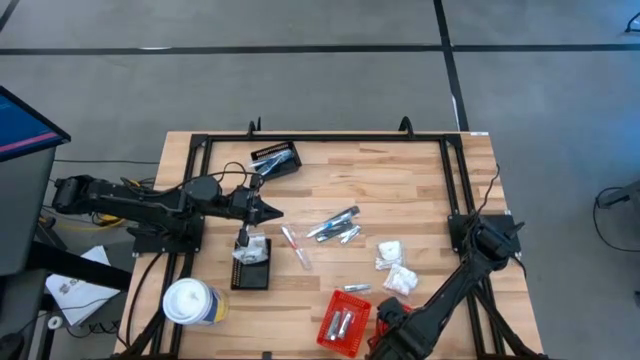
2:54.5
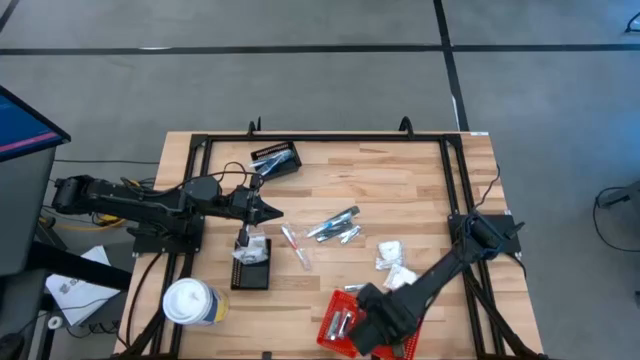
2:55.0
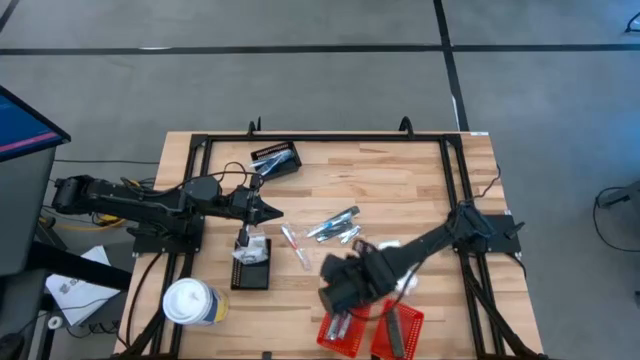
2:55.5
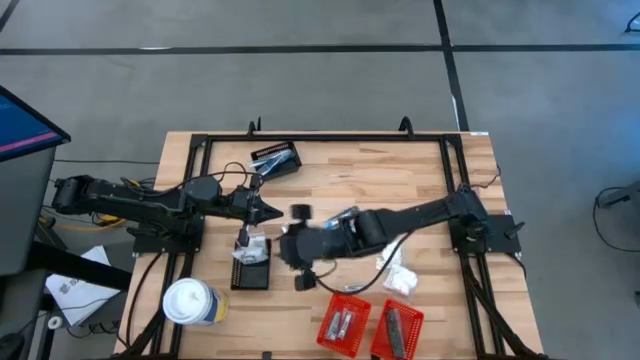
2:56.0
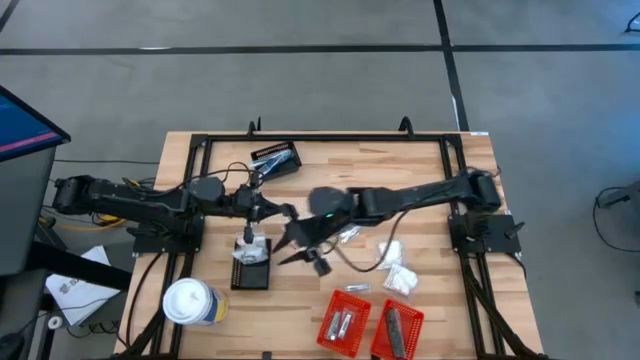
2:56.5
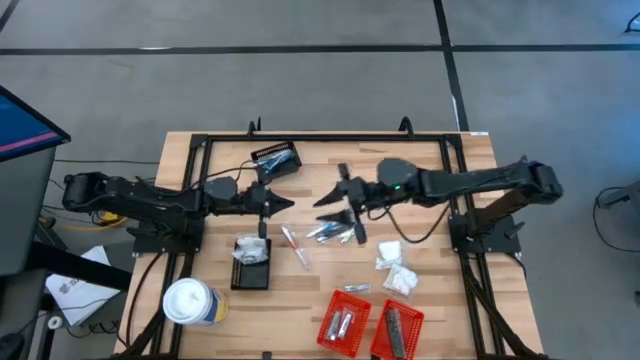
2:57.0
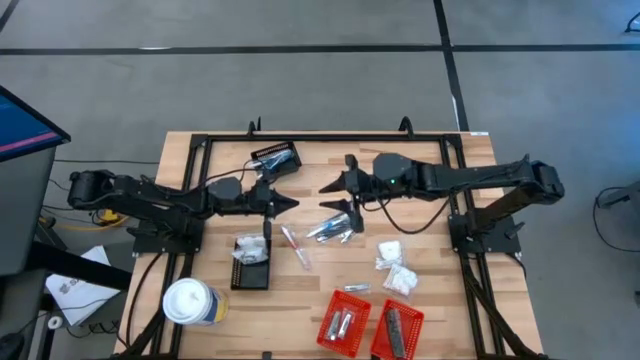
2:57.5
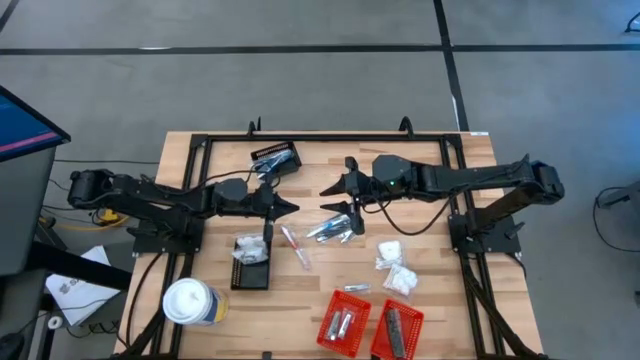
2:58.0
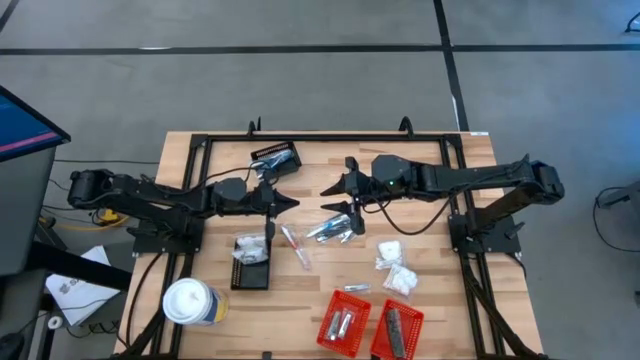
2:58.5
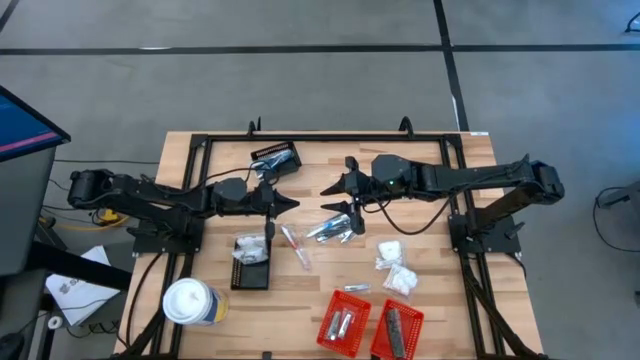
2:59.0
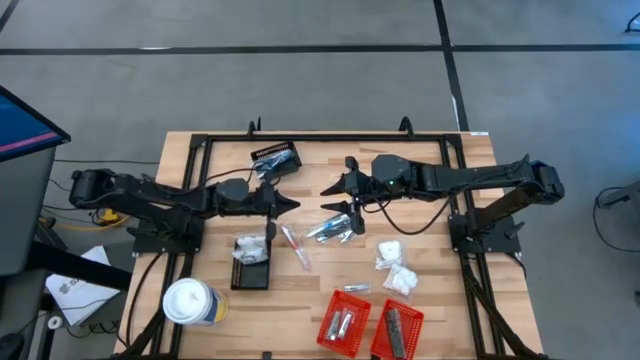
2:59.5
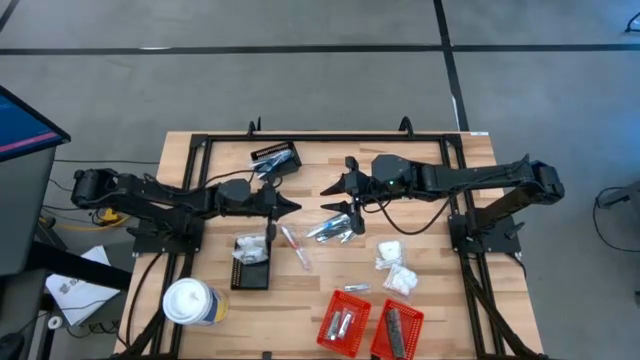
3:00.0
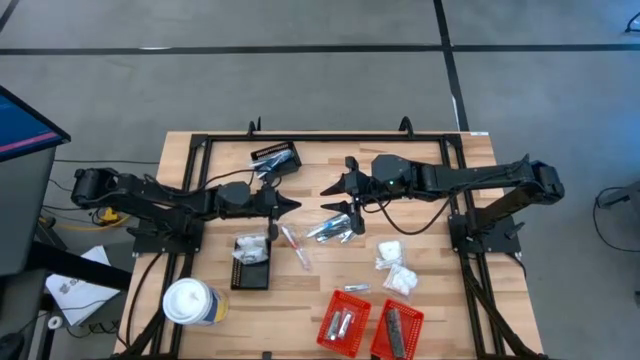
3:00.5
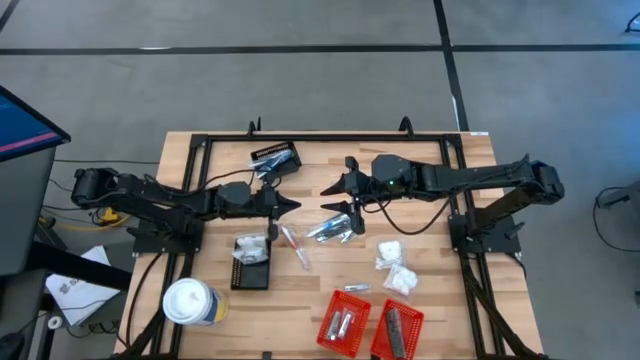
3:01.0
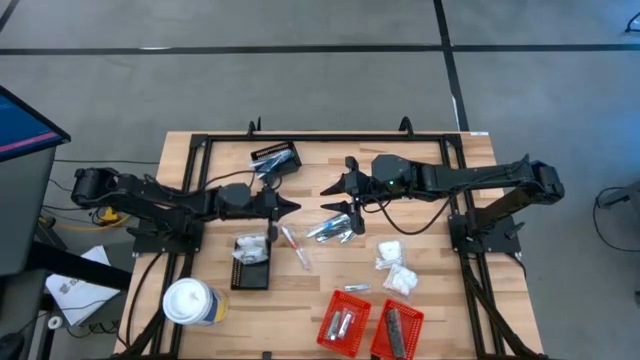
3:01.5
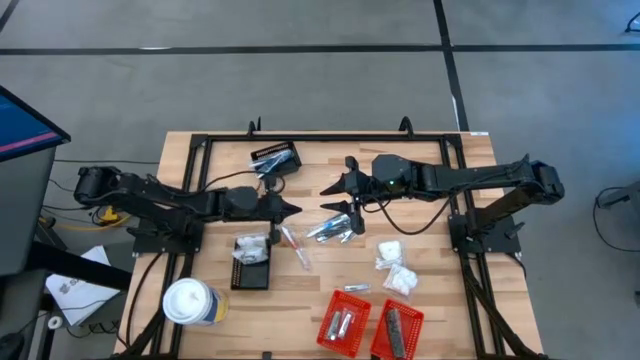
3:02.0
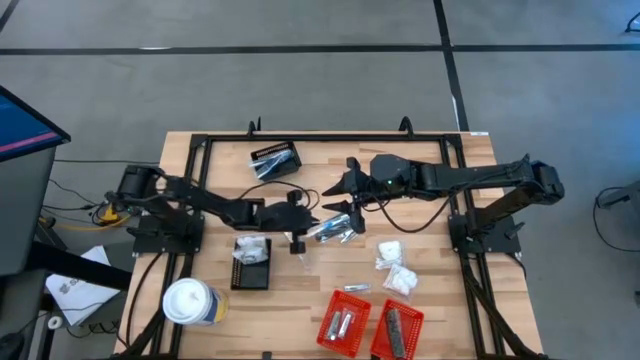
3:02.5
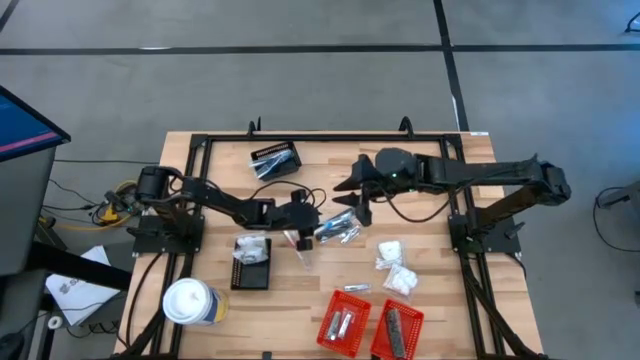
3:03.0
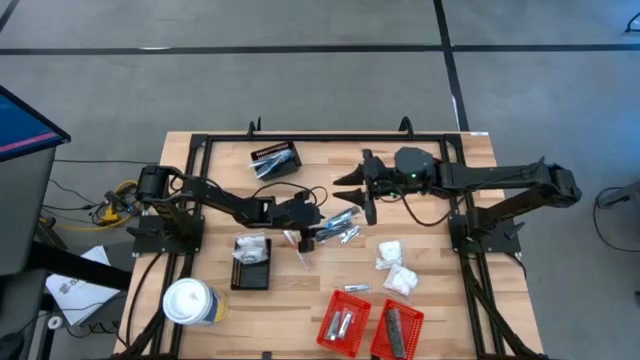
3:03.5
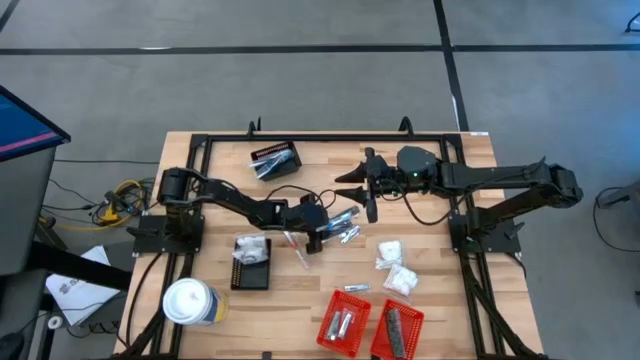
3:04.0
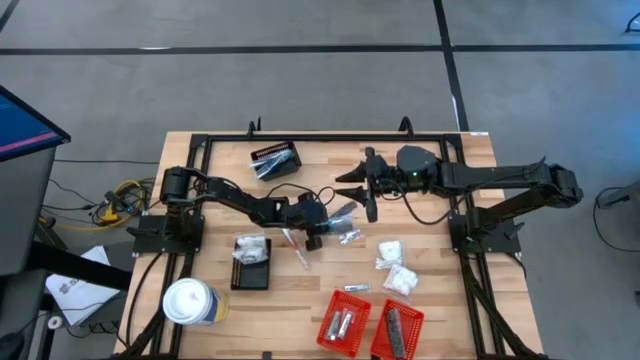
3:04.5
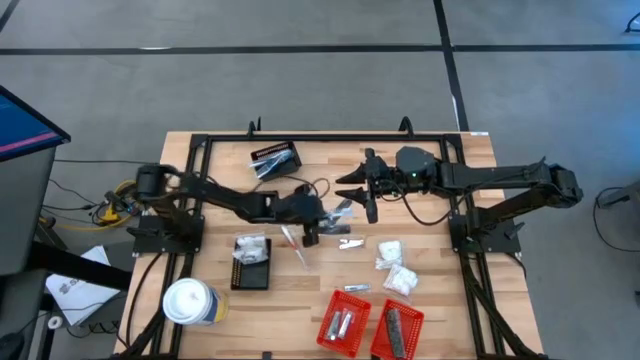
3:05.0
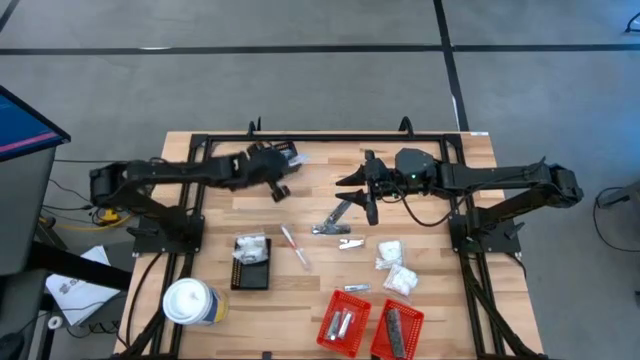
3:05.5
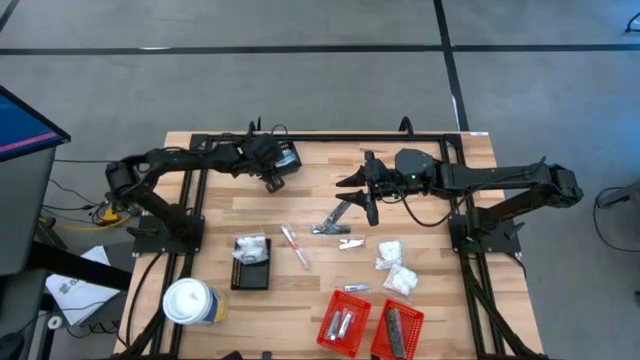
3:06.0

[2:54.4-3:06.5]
Task: Pick & Place Travel size toiletries
Put the blue toothbrush into the top black bin

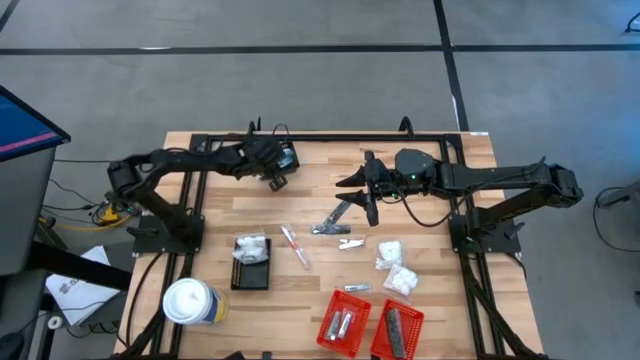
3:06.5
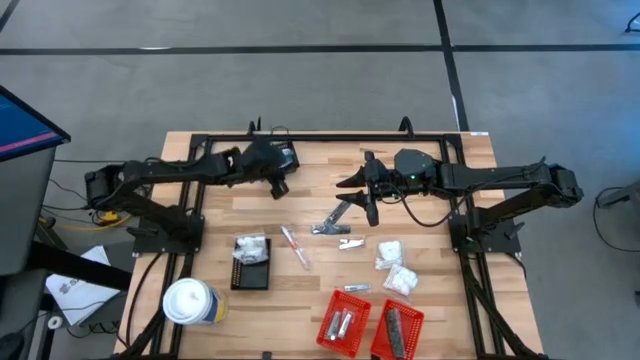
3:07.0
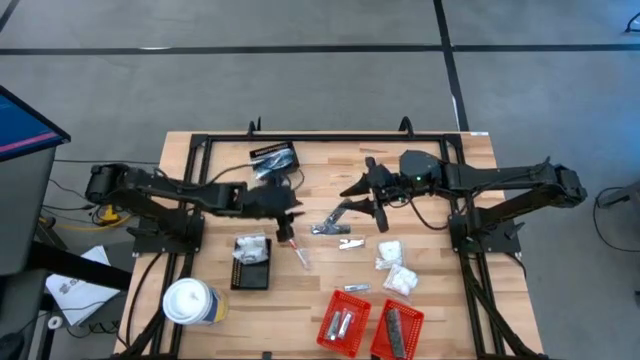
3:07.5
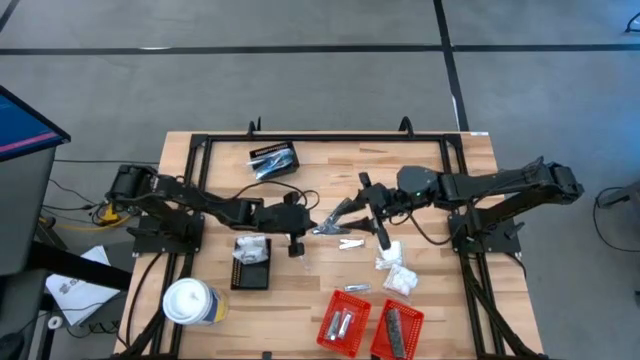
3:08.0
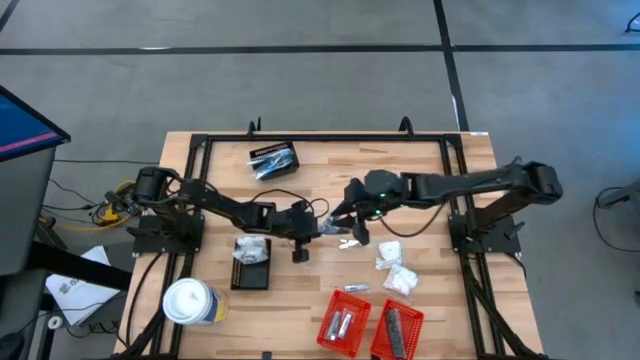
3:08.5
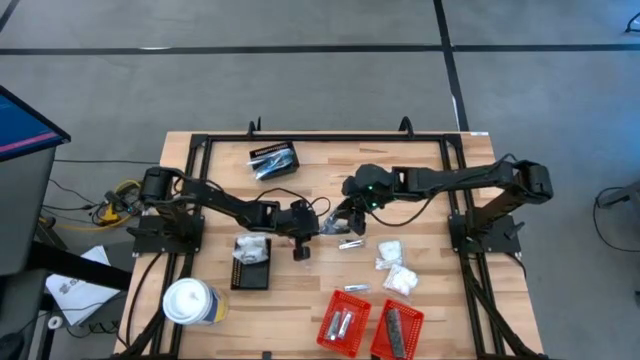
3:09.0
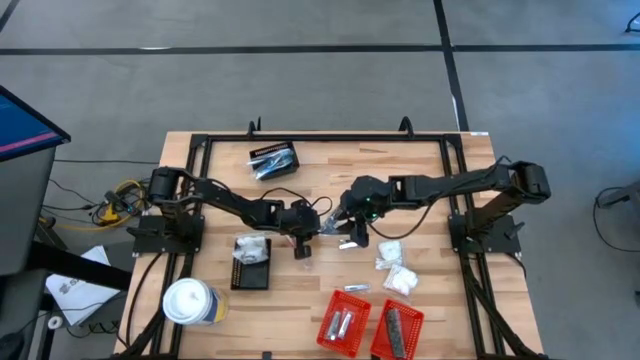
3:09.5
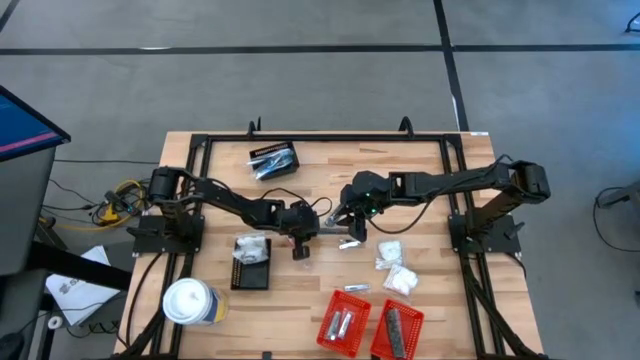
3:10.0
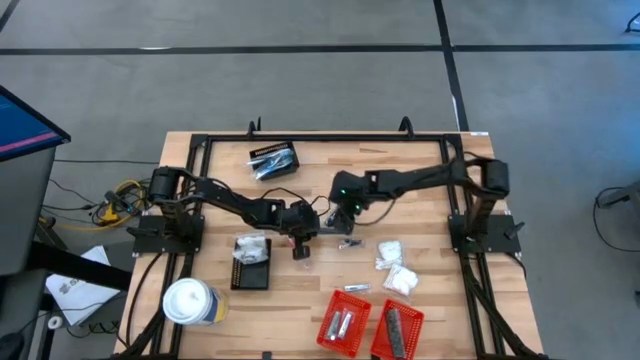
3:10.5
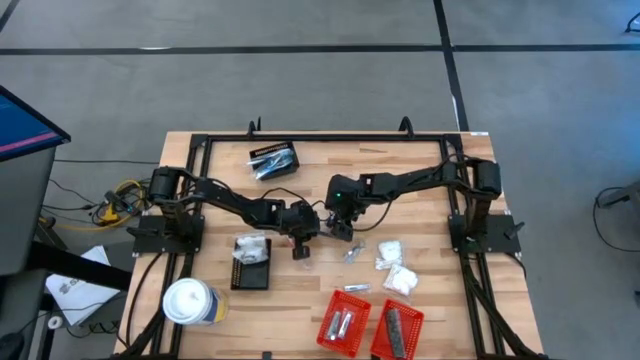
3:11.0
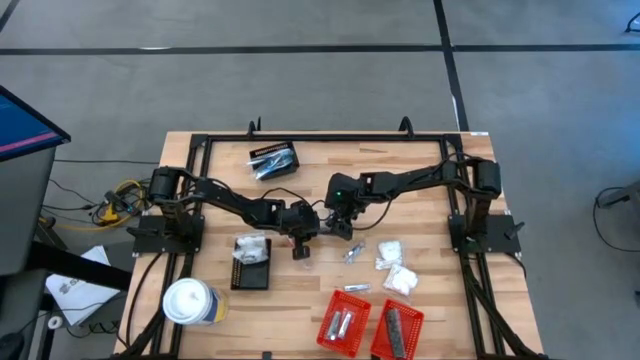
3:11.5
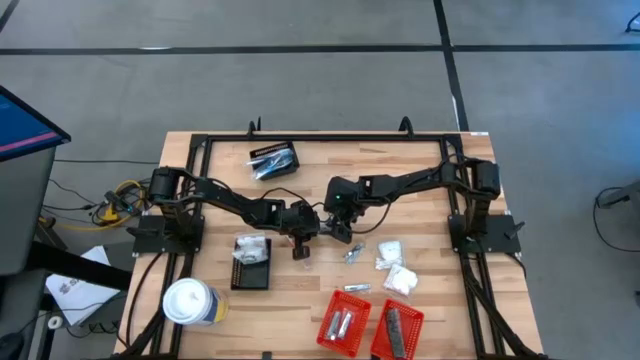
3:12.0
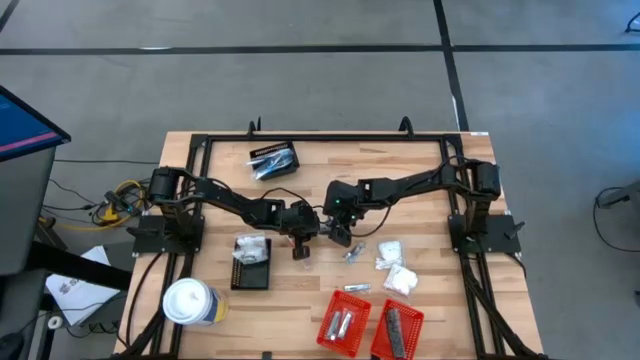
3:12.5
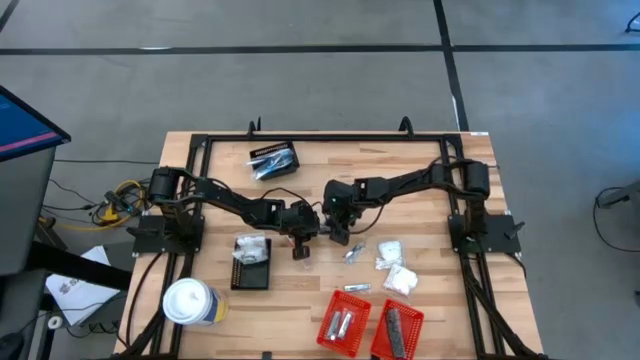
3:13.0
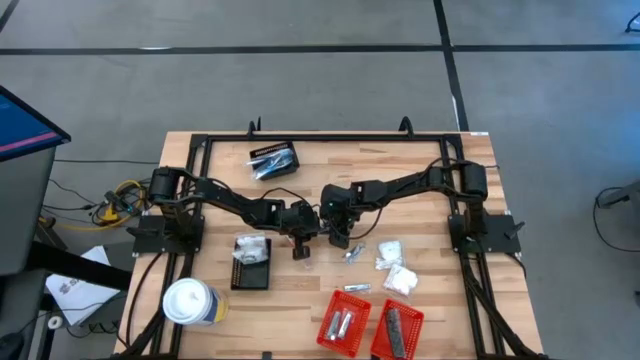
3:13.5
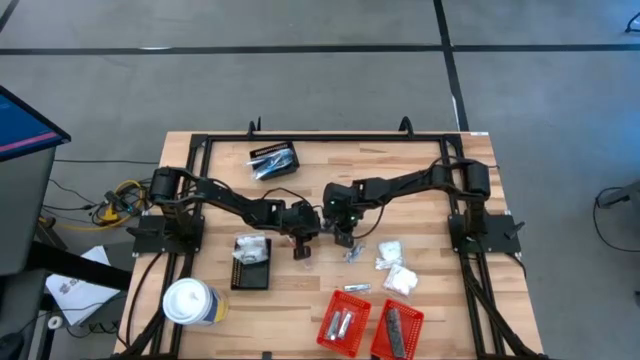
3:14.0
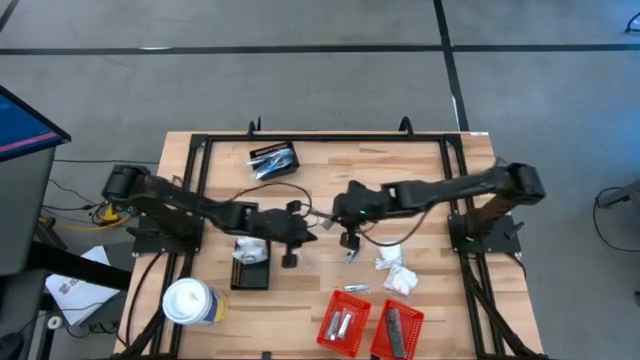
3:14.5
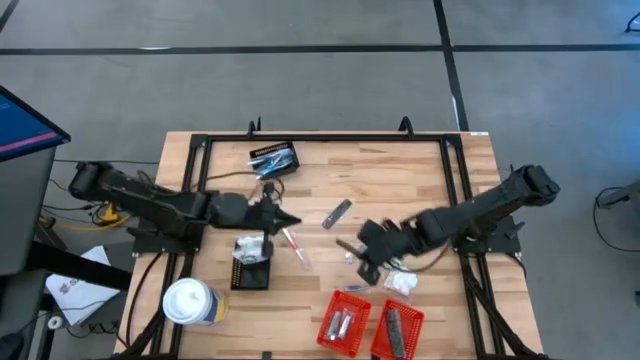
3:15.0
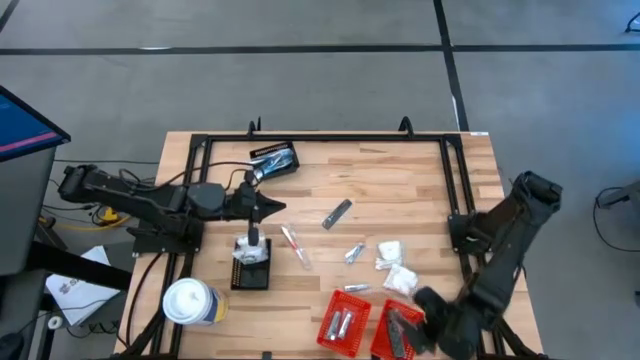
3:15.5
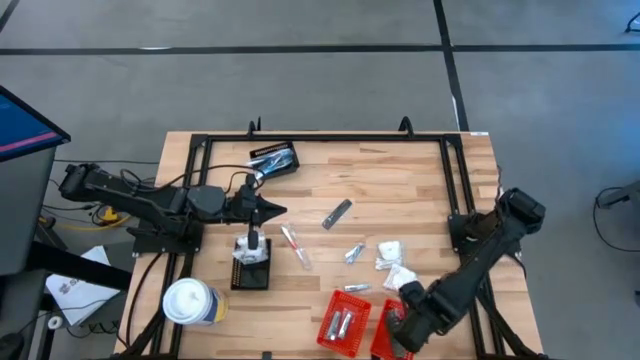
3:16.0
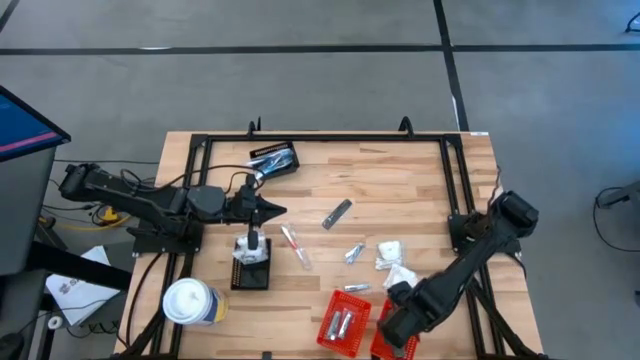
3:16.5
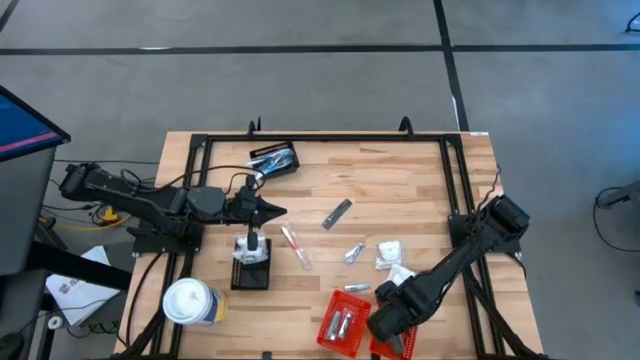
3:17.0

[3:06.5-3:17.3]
Put the black hair brush into the right red bin
